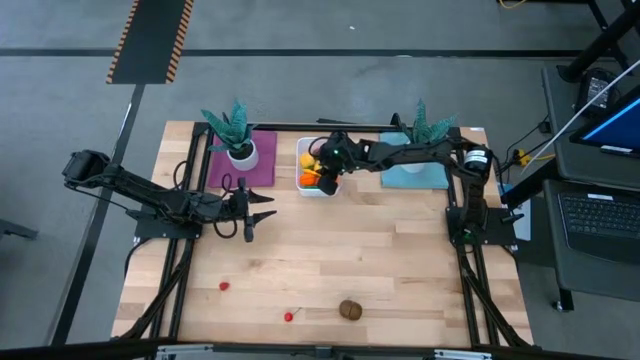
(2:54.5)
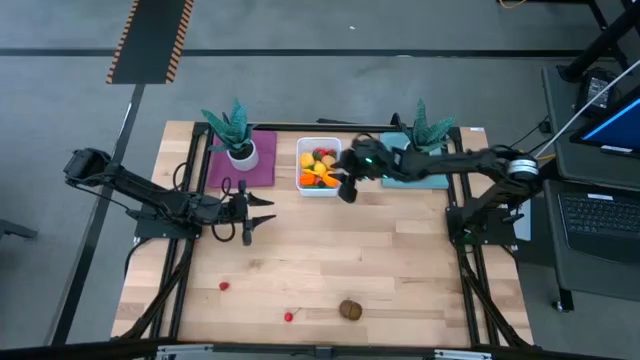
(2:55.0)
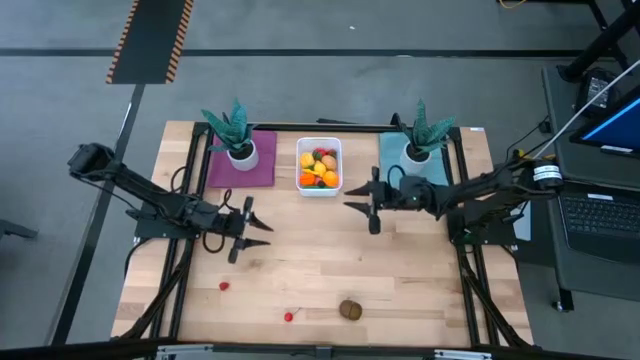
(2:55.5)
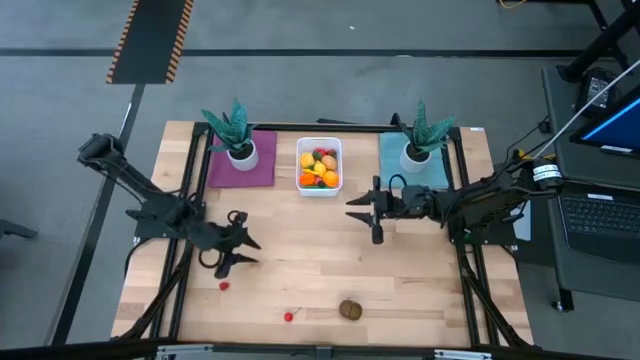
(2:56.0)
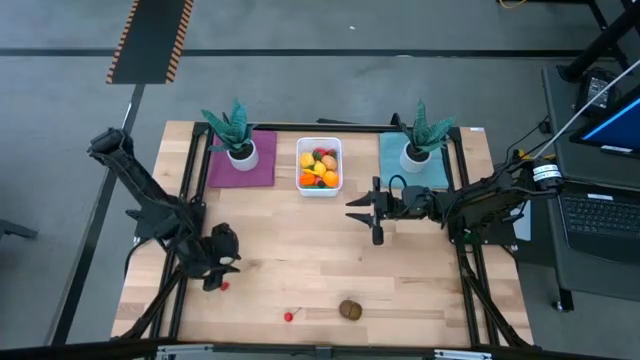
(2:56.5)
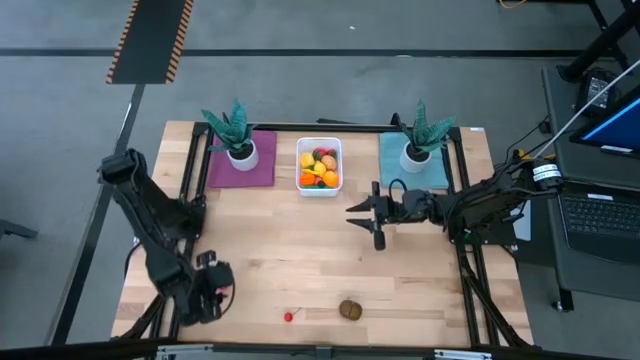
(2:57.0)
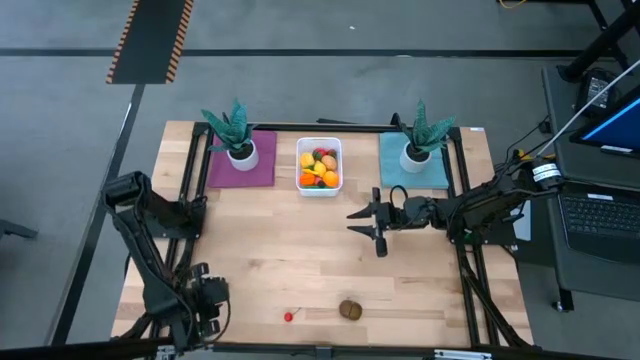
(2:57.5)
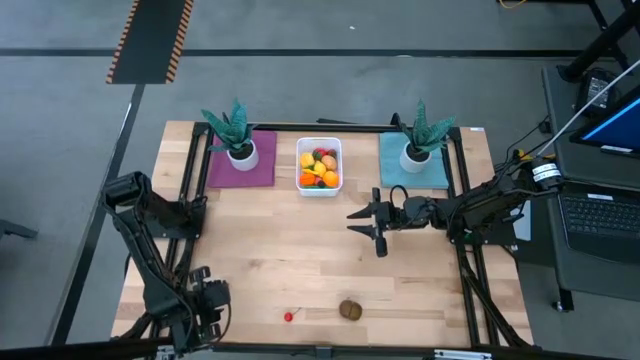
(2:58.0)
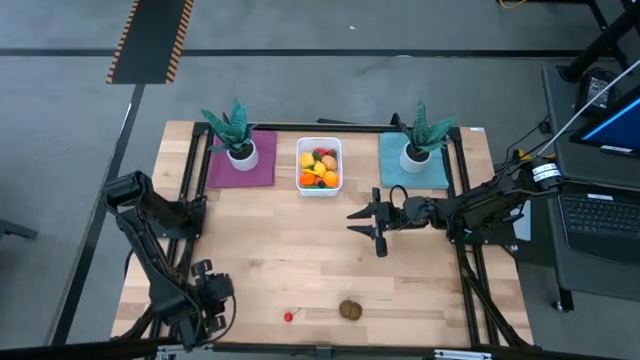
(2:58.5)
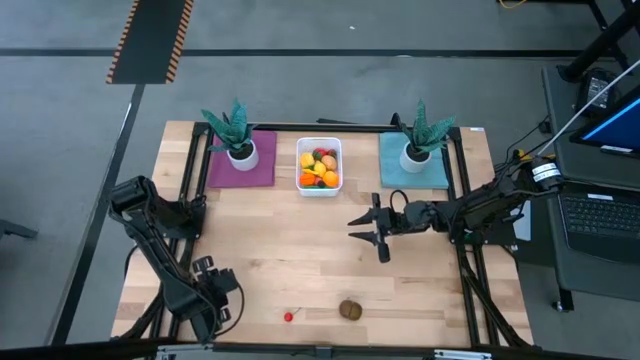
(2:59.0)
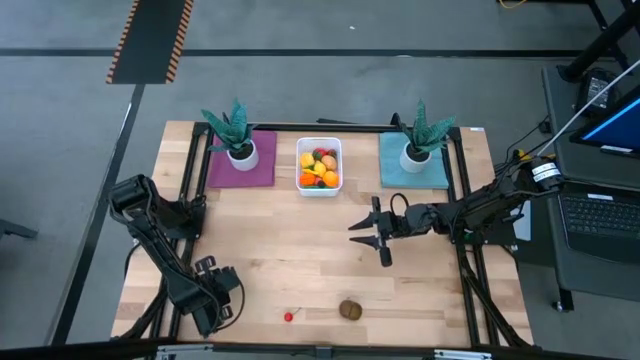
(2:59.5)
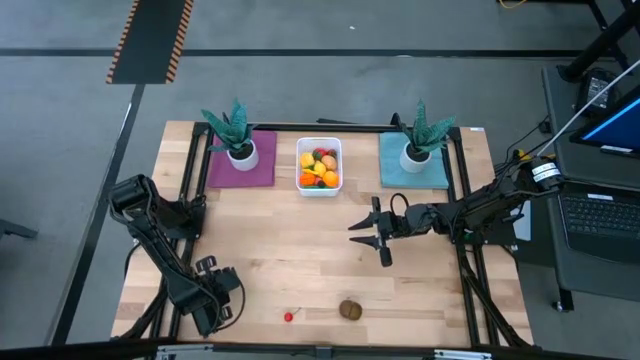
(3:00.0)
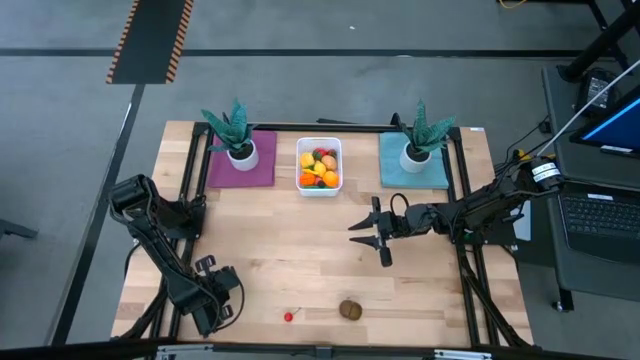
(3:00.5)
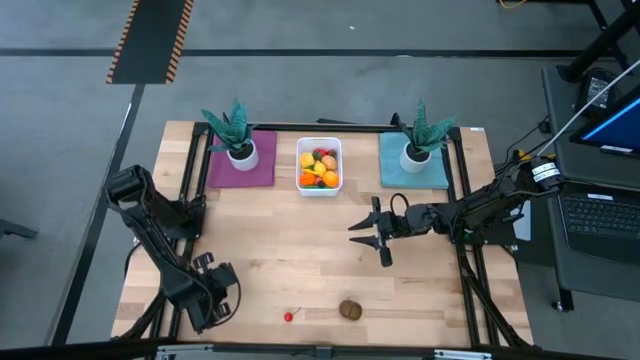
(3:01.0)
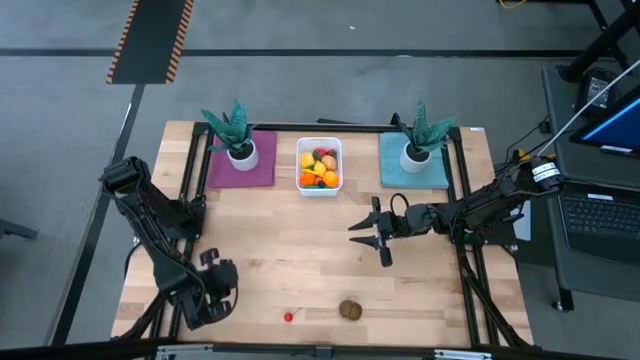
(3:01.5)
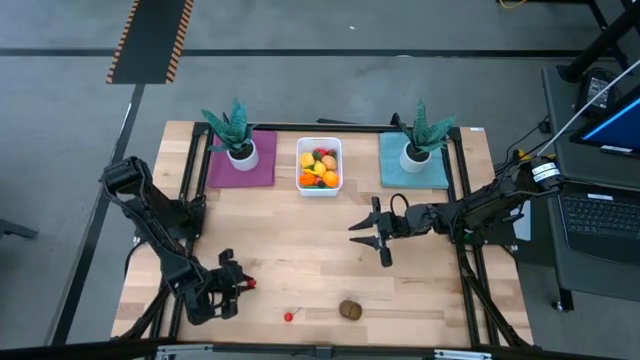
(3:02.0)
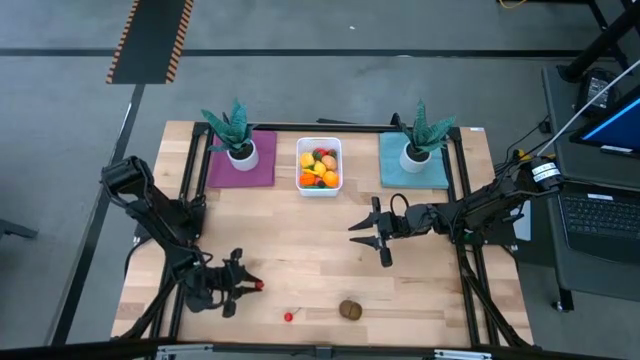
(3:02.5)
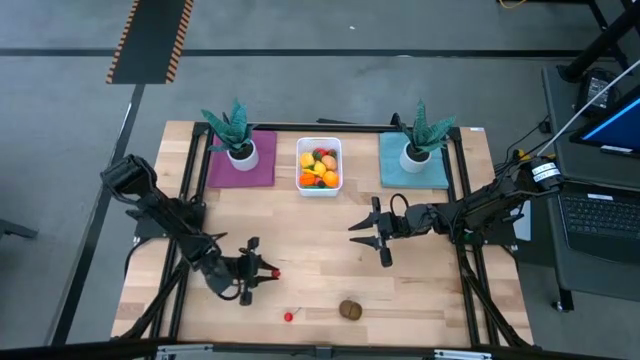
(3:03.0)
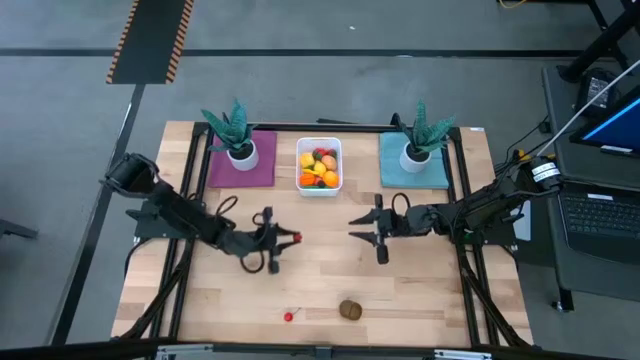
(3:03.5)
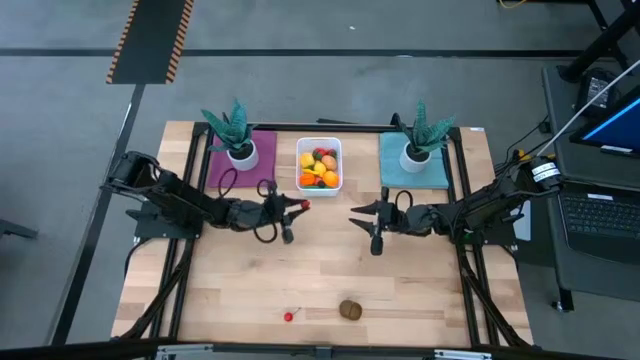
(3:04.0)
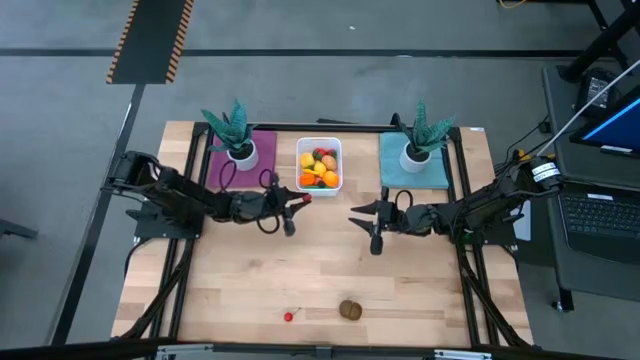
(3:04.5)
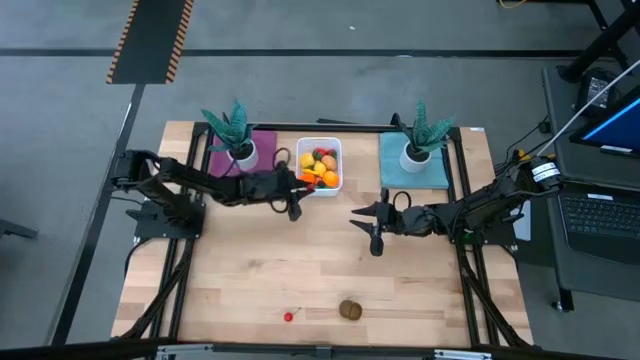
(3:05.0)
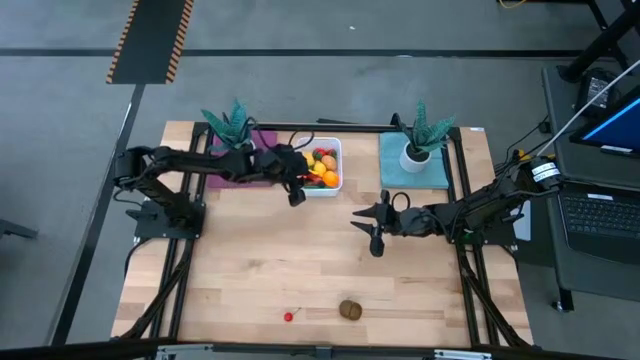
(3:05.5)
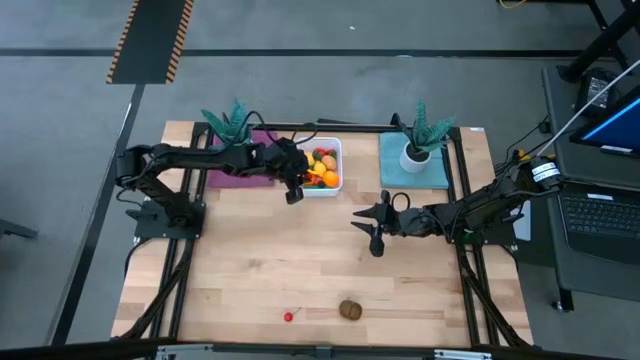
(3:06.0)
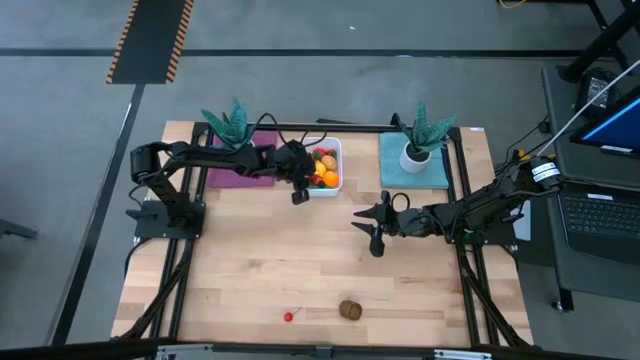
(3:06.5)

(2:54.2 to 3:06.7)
Task: Pick and placing Produce into tupperware
Put the red raspberry into the white bin

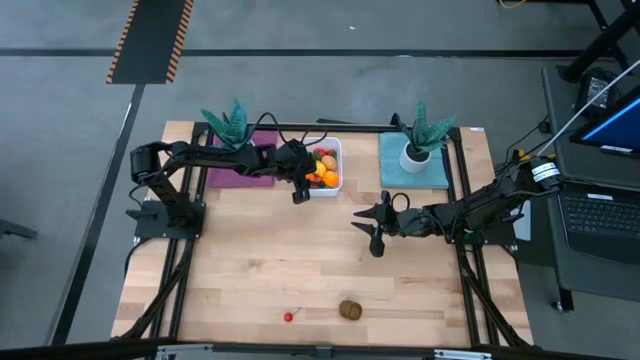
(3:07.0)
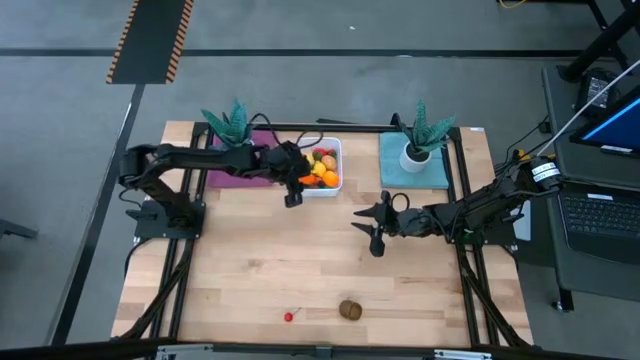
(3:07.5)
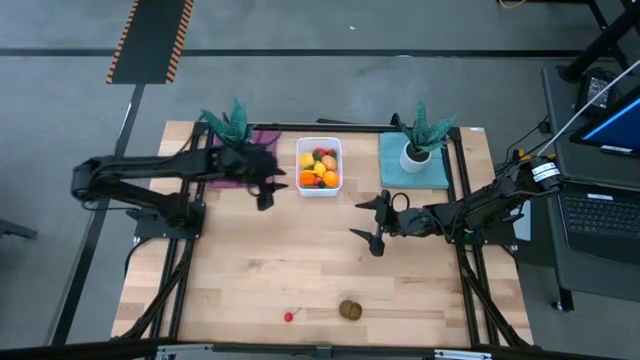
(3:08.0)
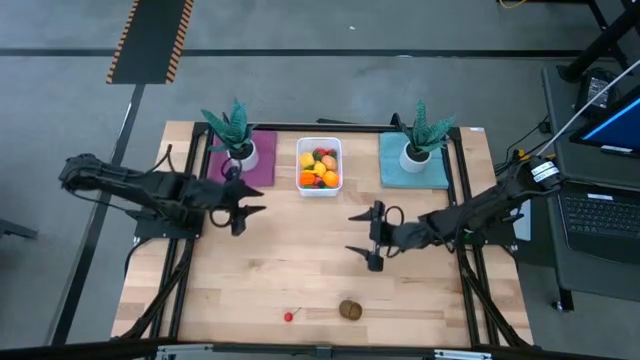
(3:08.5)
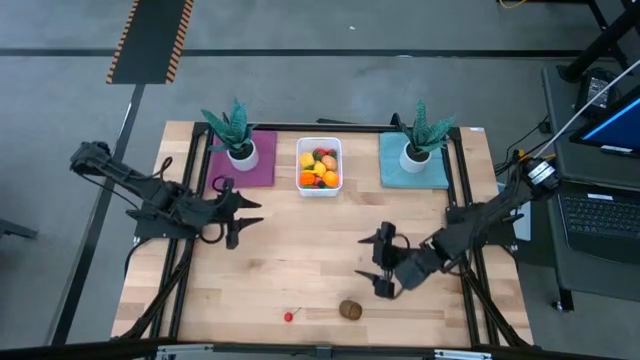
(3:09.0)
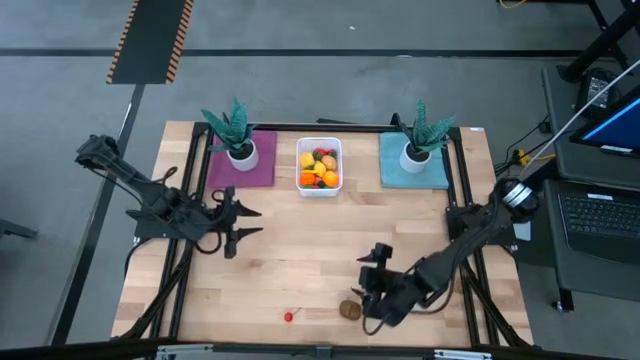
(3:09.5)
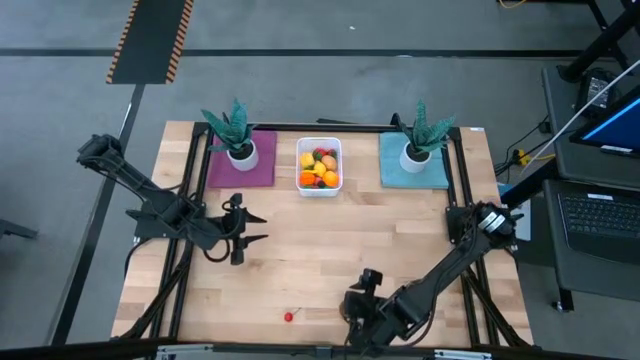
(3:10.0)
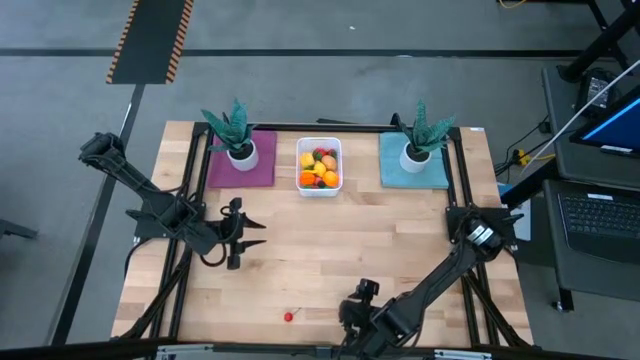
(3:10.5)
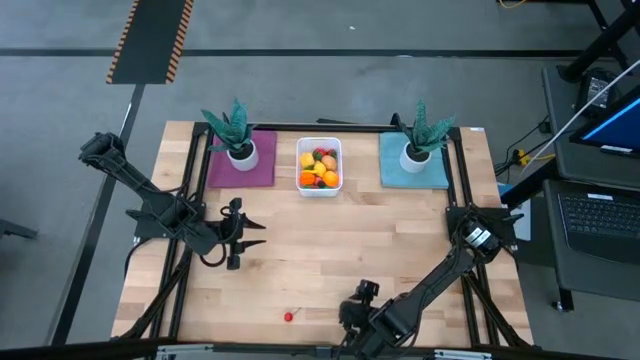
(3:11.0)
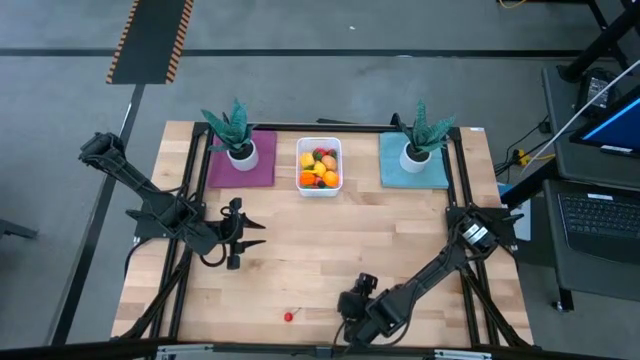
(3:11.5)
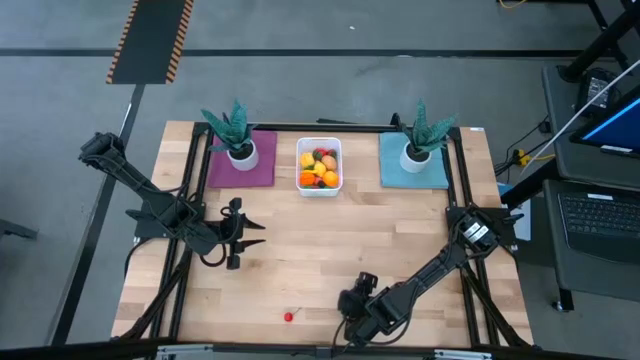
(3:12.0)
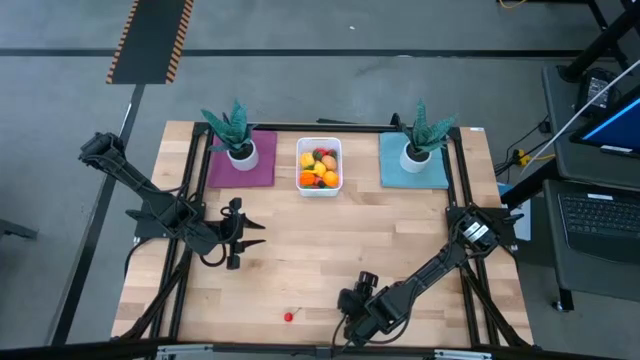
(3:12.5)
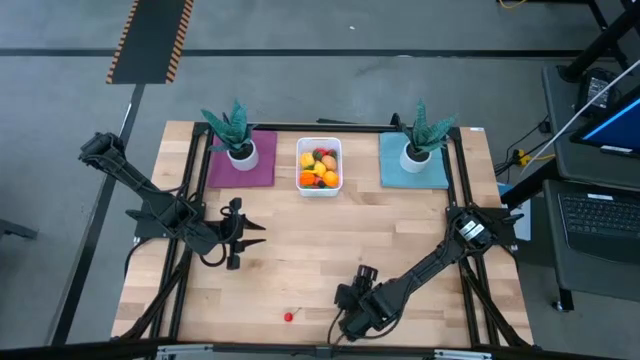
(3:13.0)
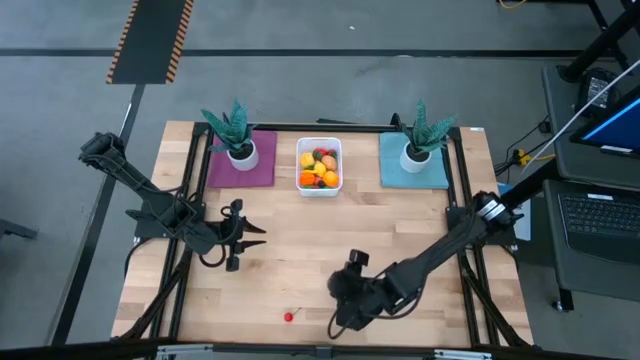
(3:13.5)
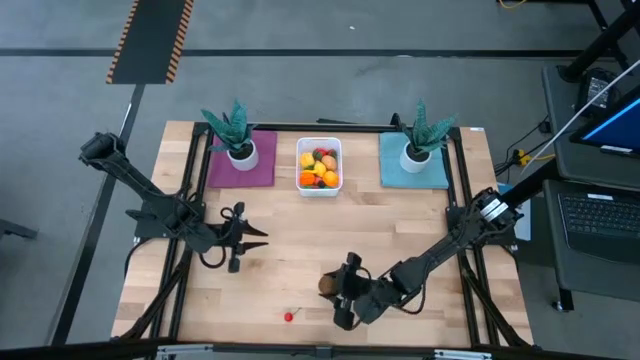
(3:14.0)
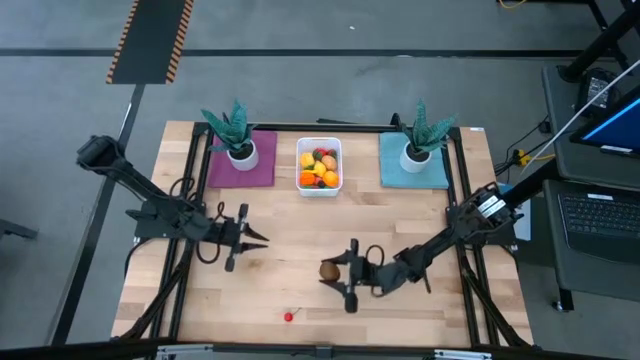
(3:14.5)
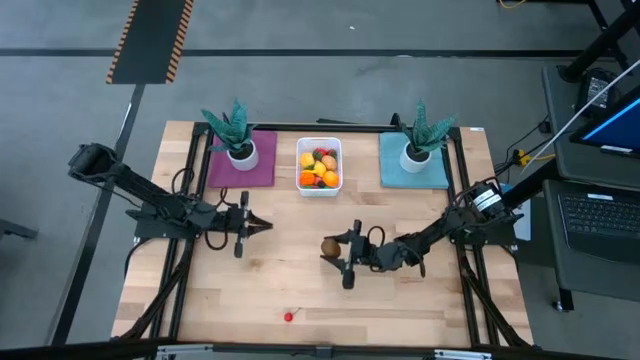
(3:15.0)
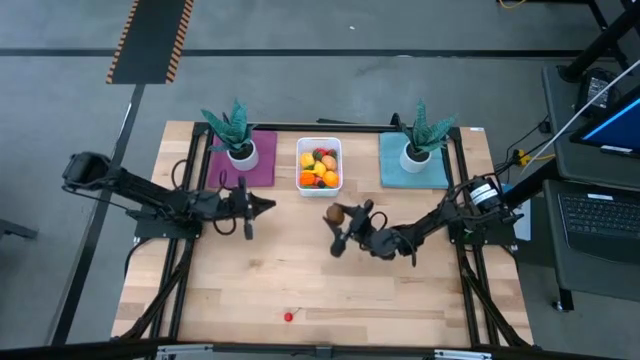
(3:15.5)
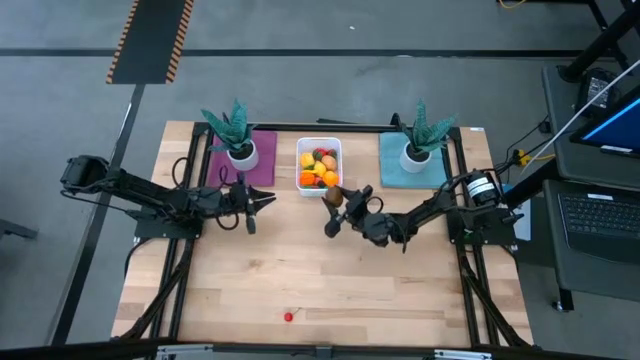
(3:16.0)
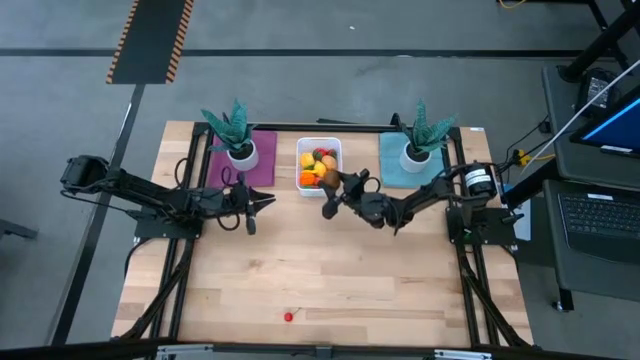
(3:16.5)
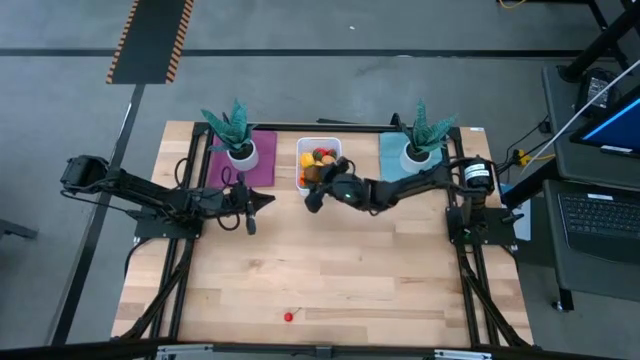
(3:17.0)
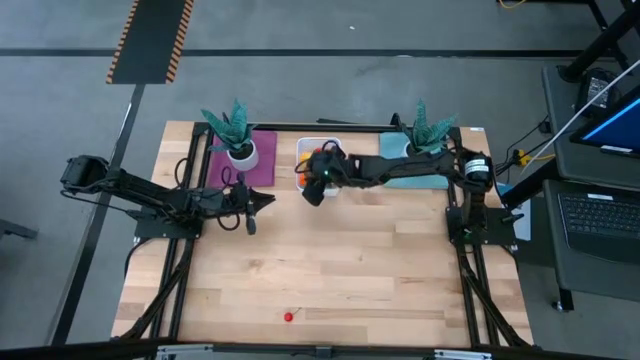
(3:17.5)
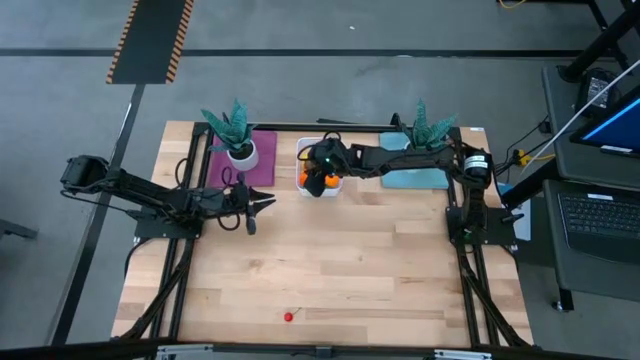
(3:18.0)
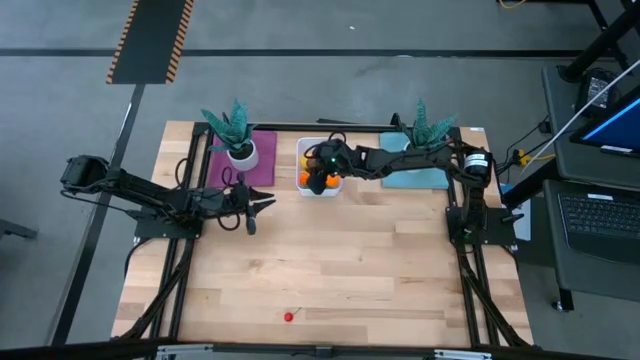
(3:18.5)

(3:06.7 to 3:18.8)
Put the brown kiwi into the white bin
